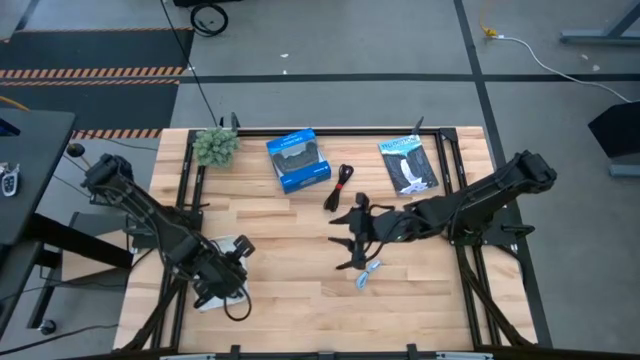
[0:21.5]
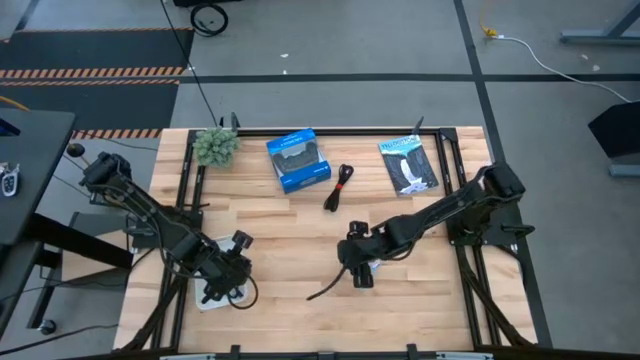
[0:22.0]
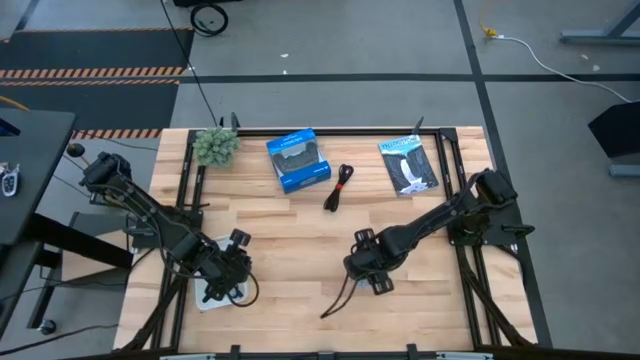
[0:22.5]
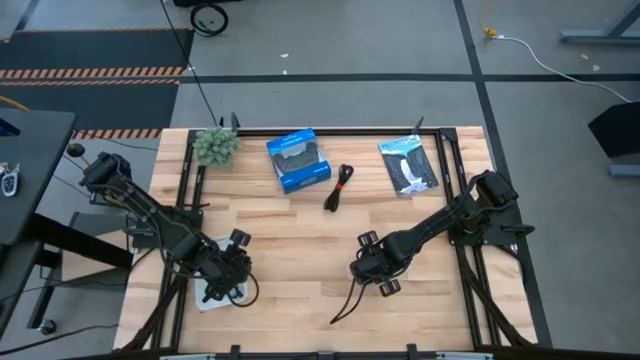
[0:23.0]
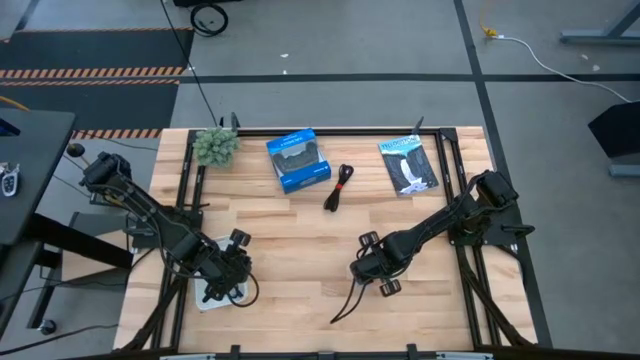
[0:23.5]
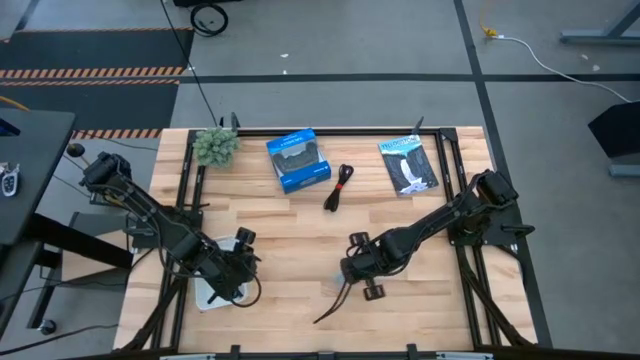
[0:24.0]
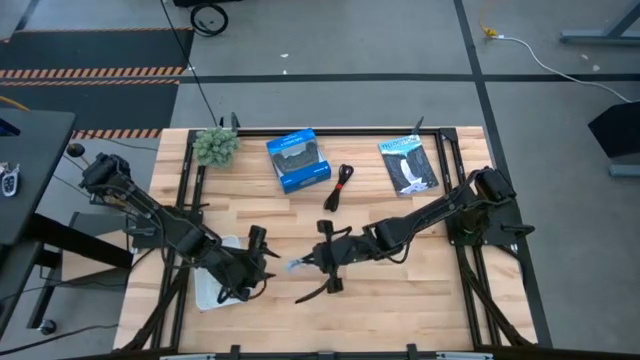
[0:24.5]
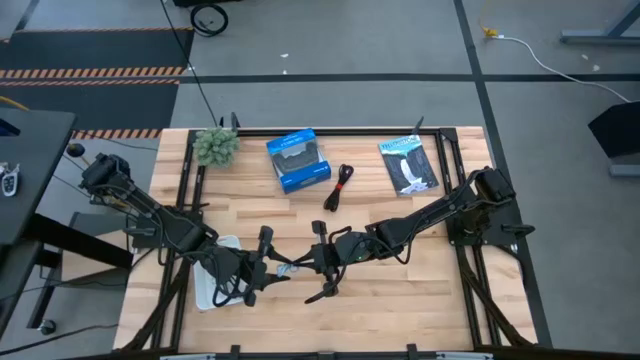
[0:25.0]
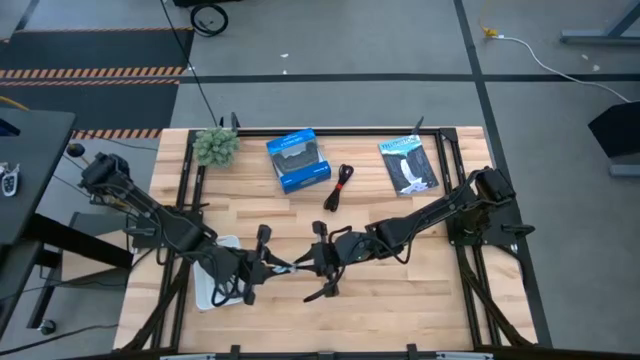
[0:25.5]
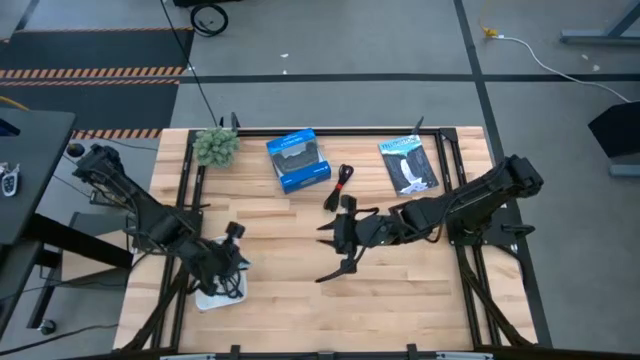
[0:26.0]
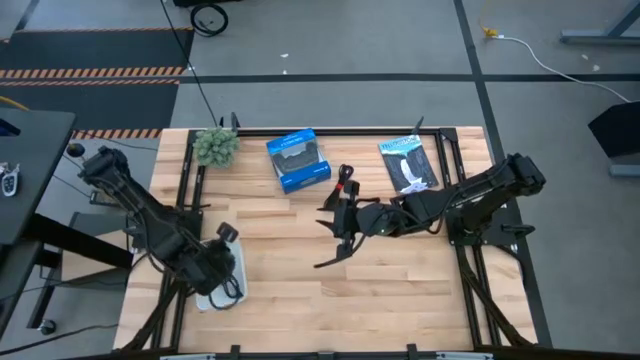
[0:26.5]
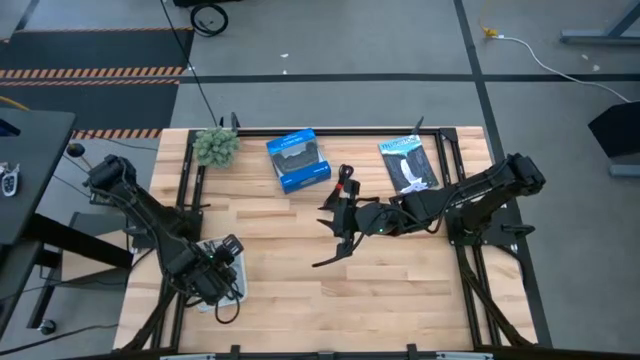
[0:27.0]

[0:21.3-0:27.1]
Task: Pick and place USB-C Cables
Put the blue charger cable into the white bin

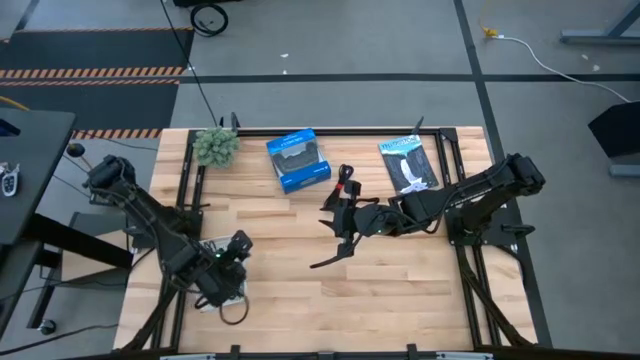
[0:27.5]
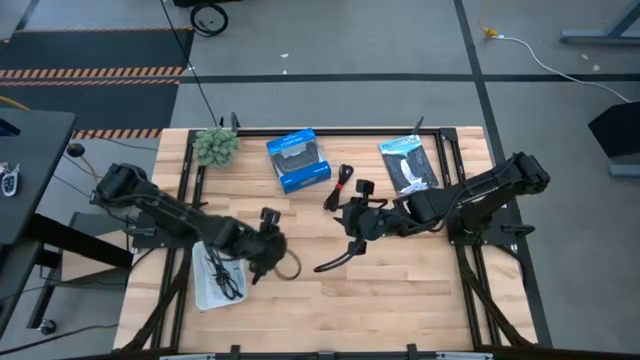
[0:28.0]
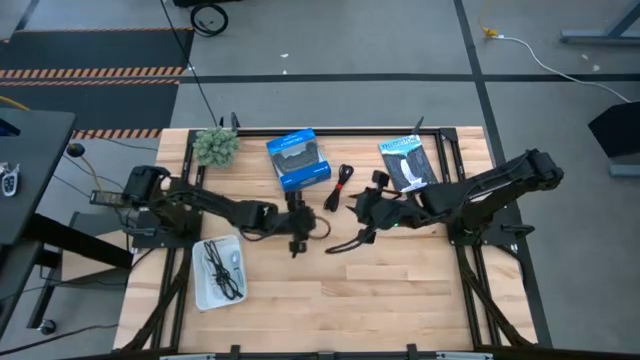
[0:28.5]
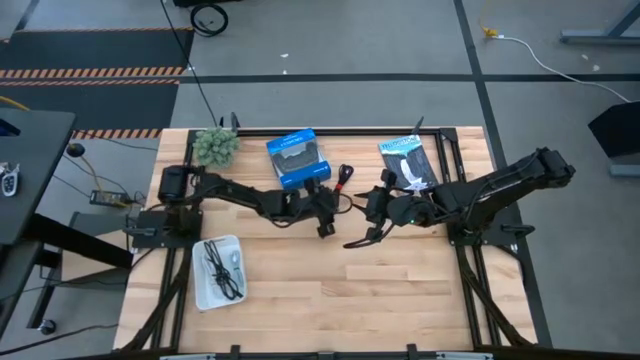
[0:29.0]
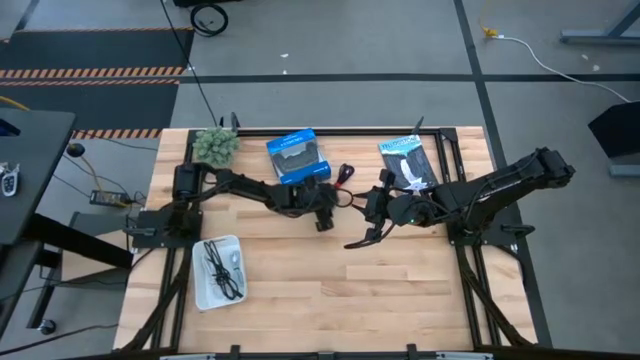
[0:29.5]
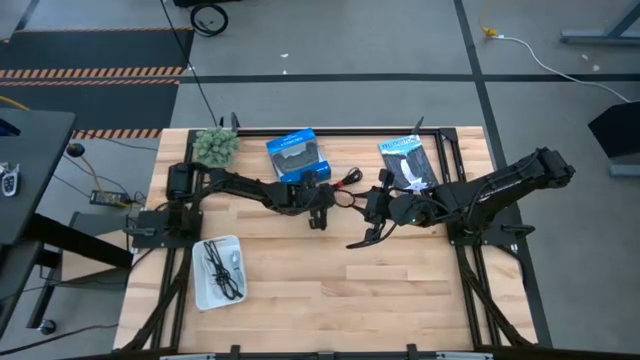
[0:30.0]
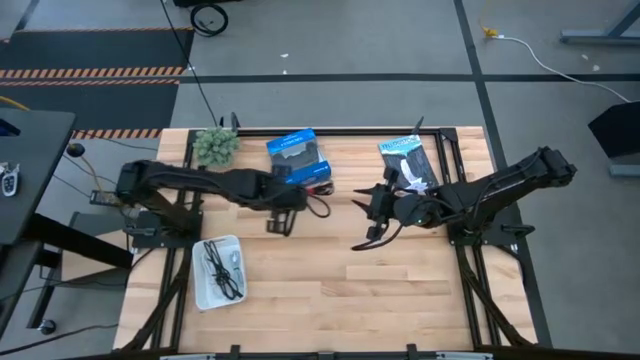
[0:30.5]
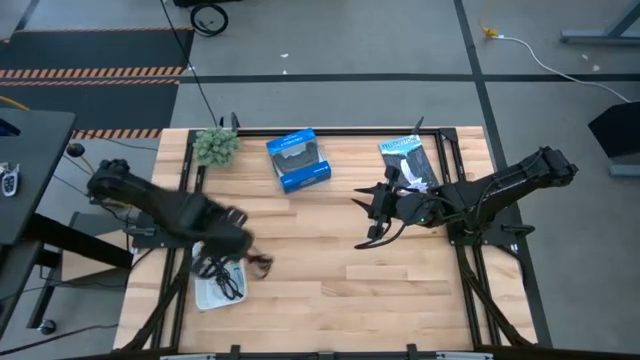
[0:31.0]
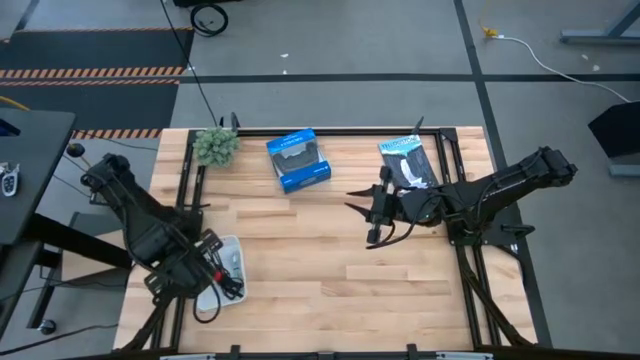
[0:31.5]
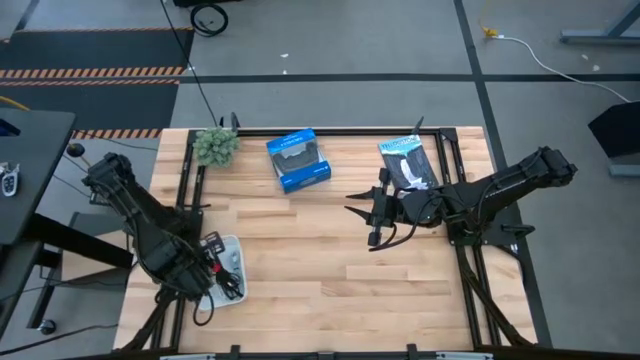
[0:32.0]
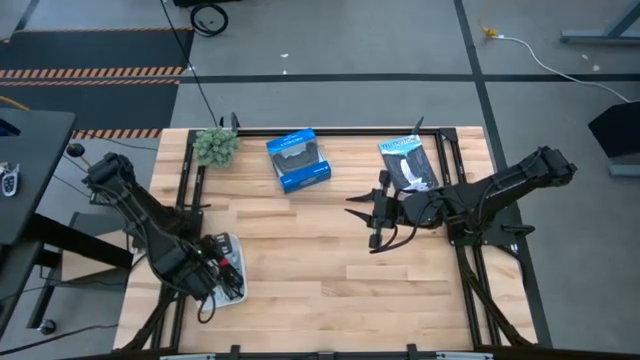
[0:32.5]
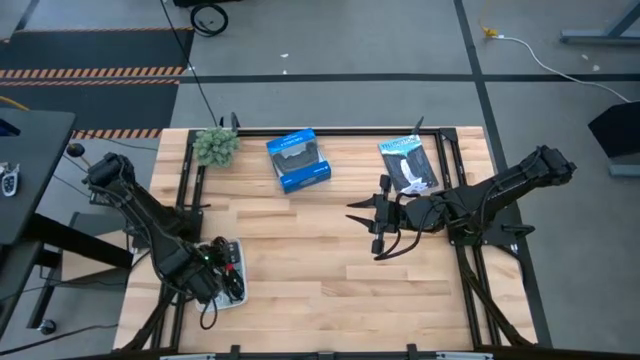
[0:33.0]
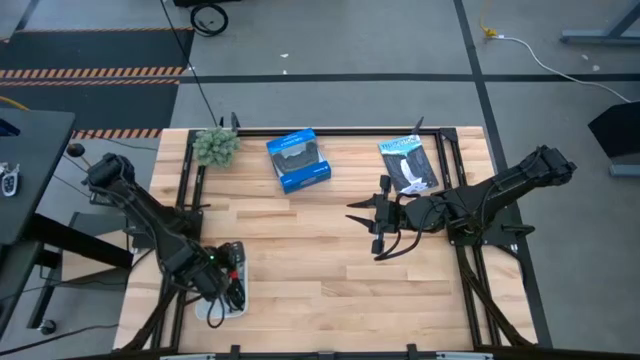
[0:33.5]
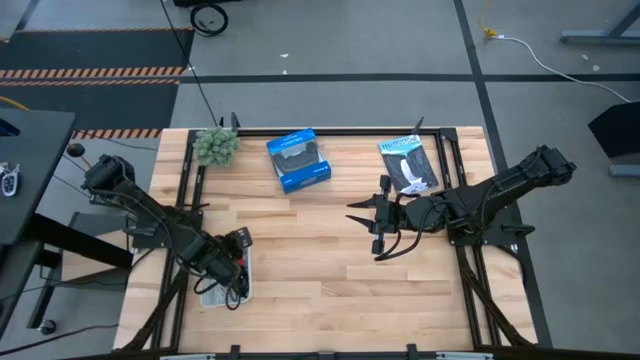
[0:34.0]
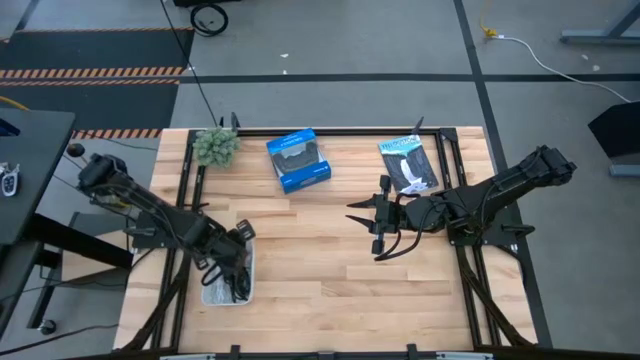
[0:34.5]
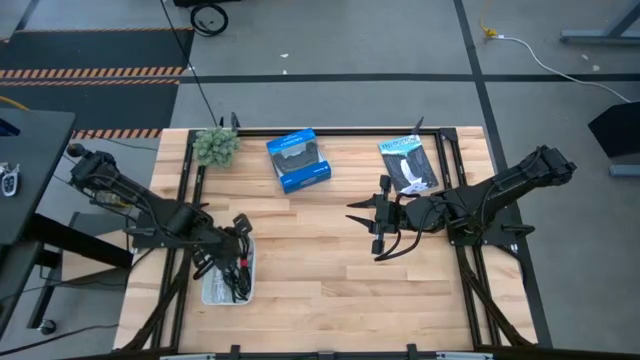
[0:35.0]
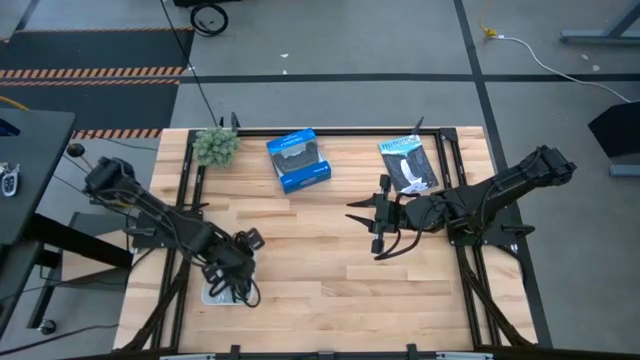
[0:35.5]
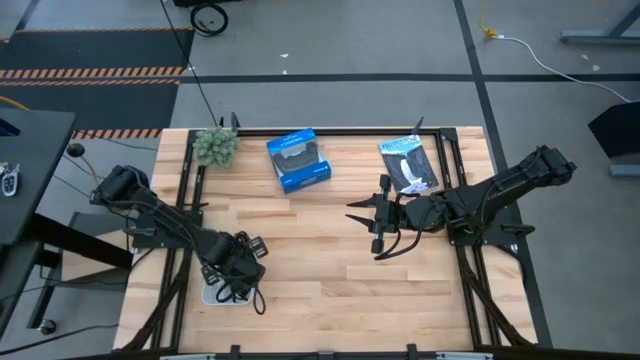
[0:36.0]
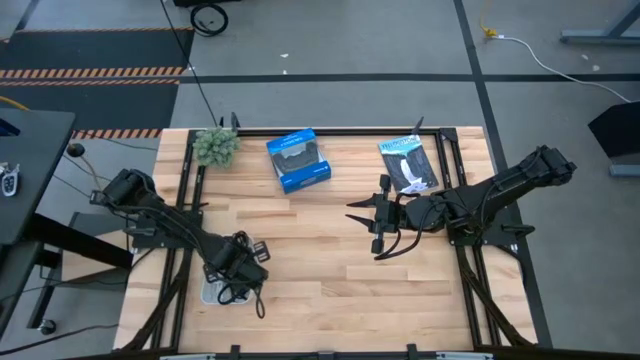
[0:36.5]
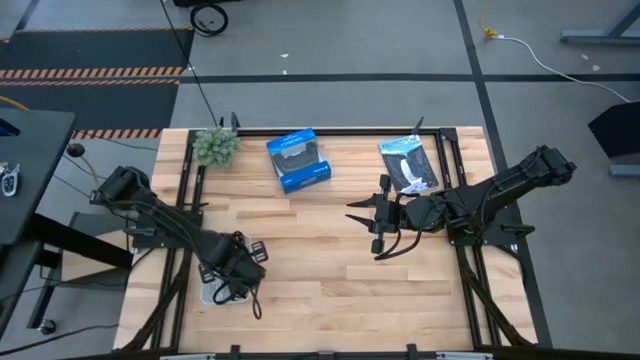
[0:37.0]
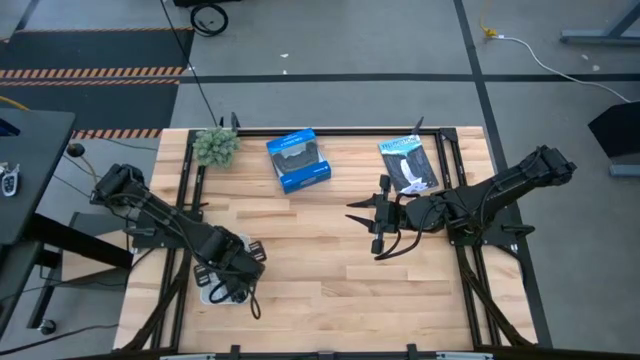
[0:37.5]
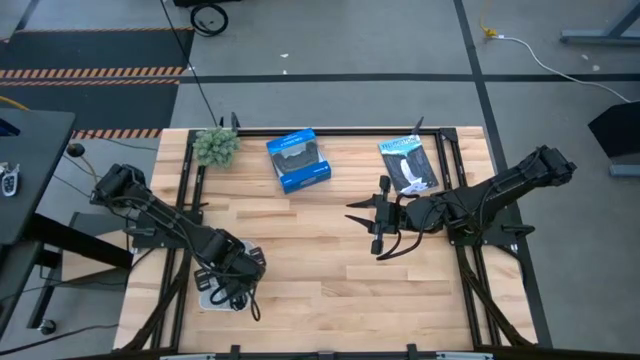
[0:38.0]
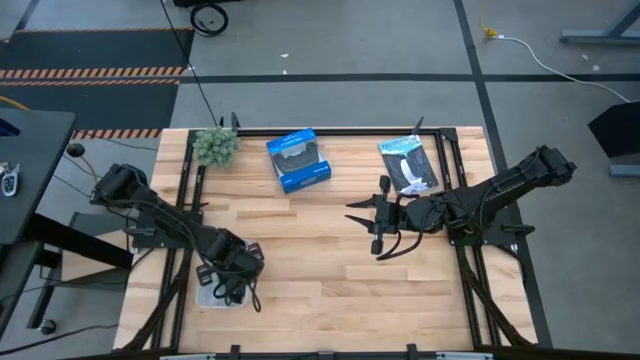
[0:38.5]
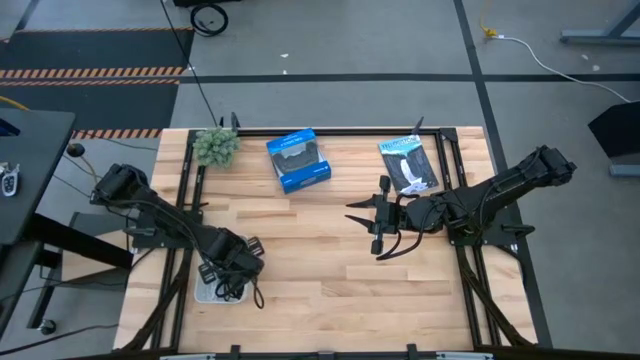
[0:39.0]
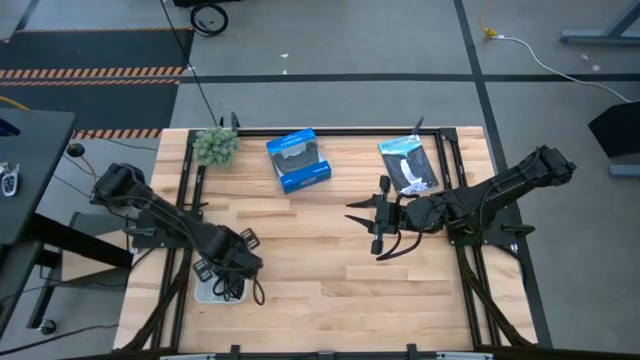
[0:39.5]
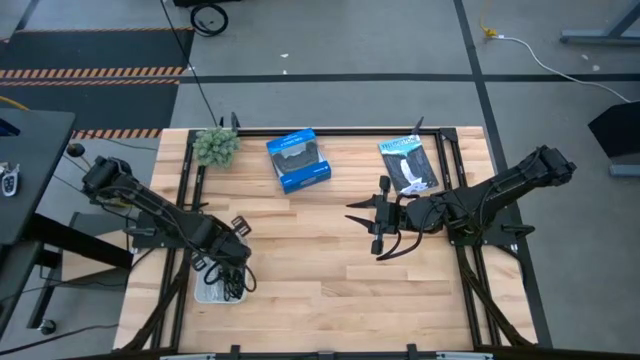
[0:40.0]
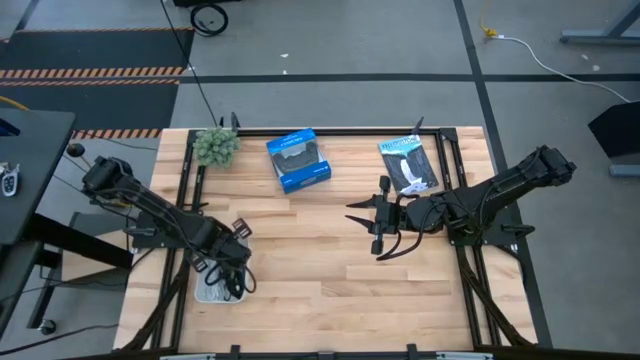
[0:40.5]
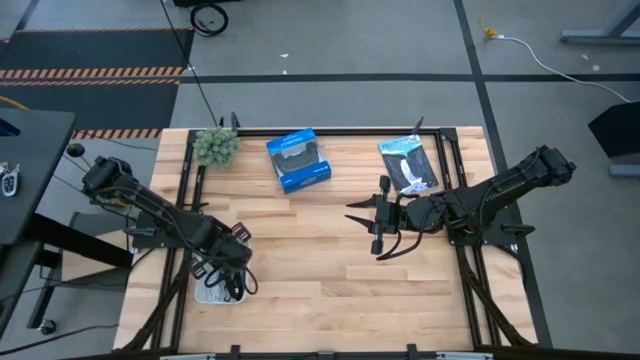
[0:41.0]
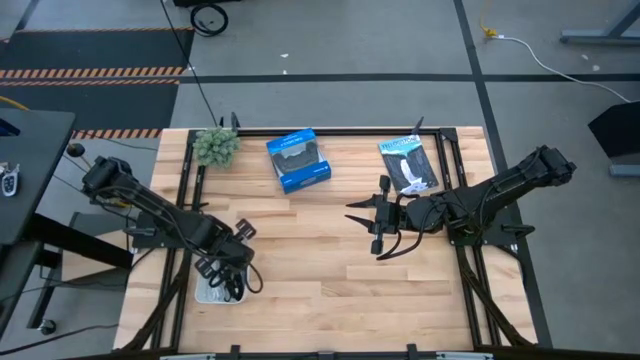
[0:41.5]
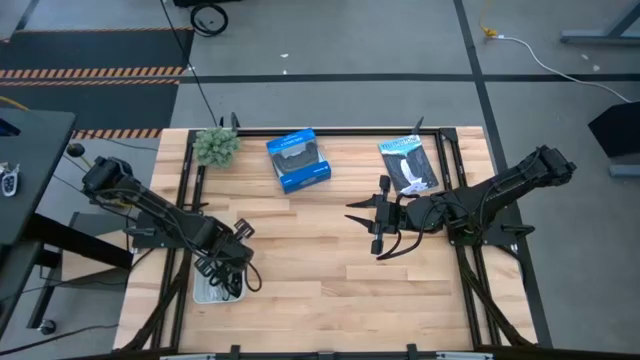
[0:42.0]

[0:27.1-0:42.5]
Put the black charger cable into the white bin
